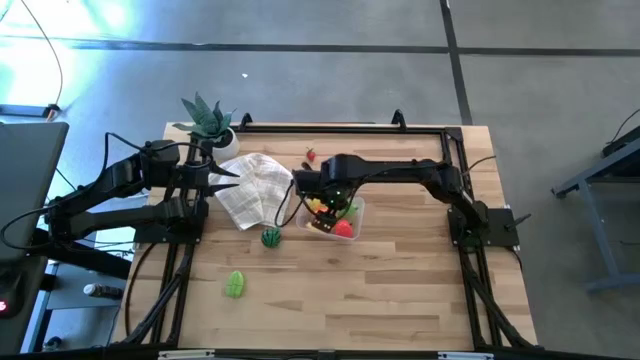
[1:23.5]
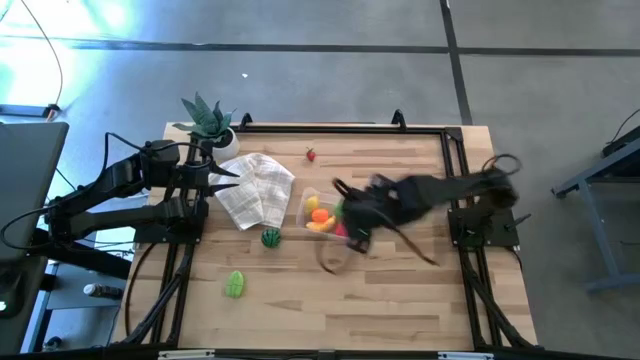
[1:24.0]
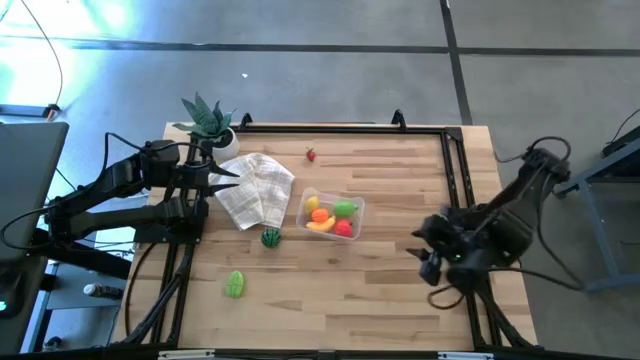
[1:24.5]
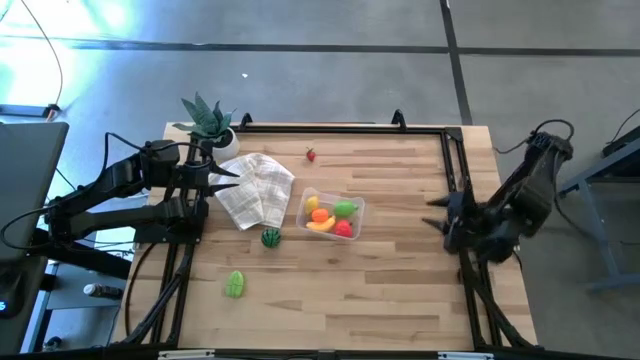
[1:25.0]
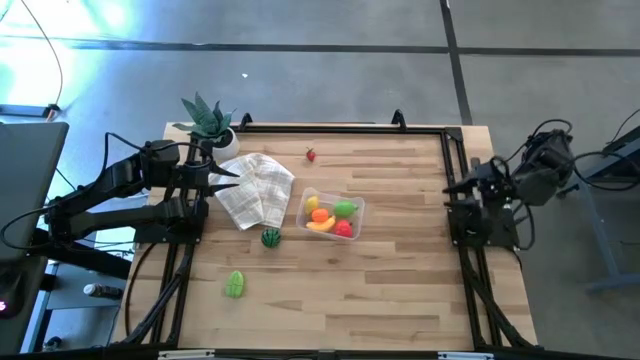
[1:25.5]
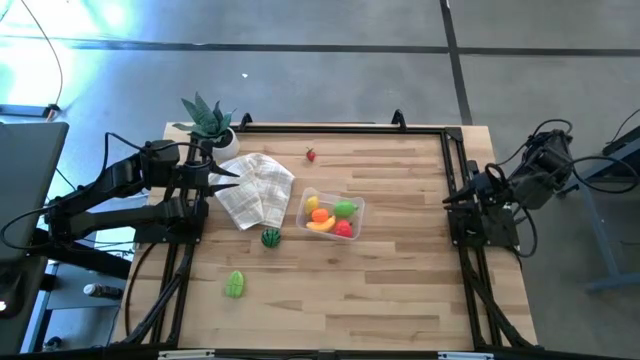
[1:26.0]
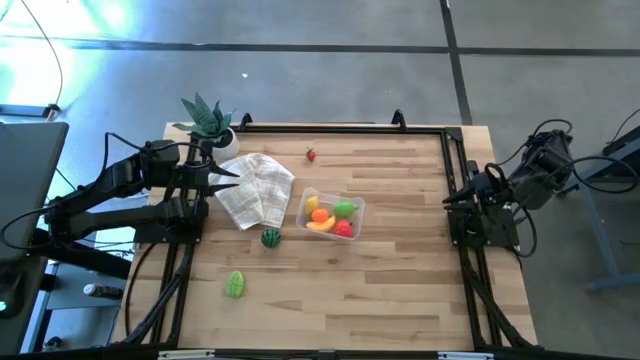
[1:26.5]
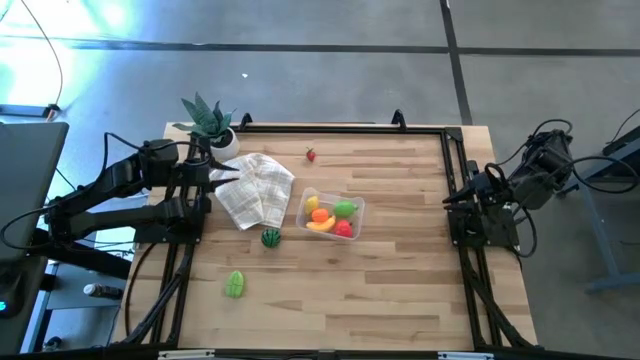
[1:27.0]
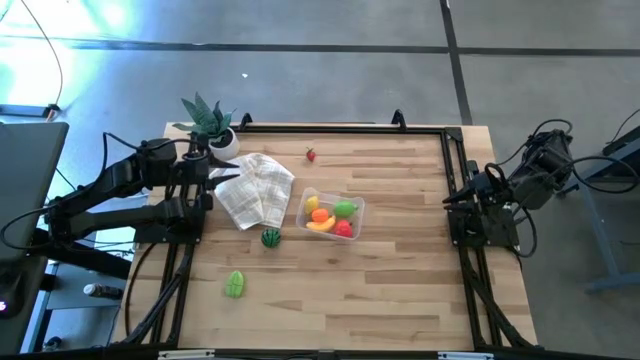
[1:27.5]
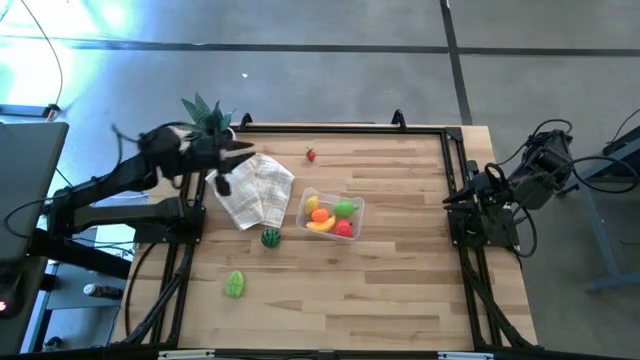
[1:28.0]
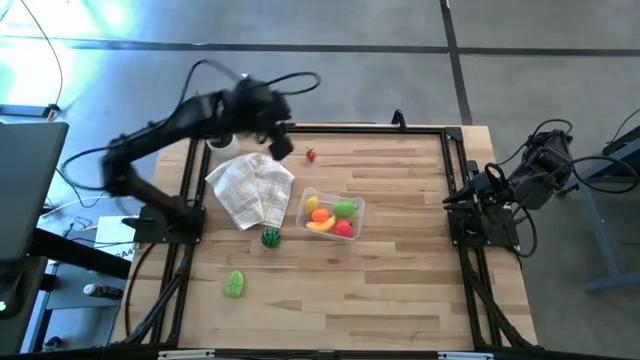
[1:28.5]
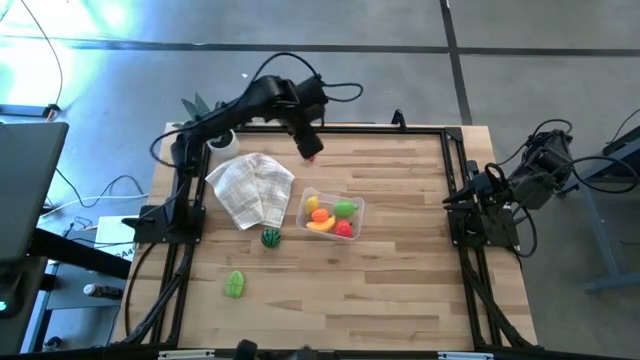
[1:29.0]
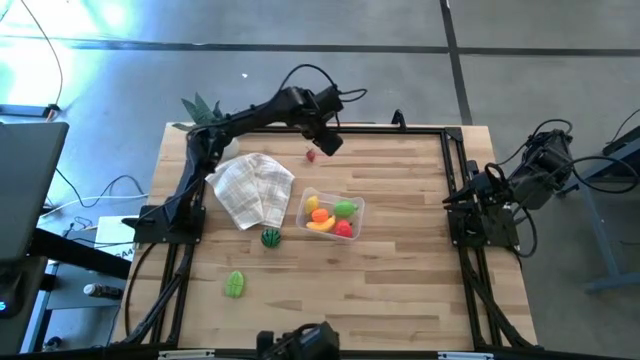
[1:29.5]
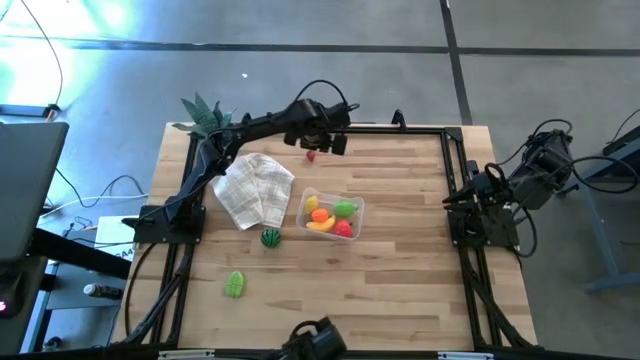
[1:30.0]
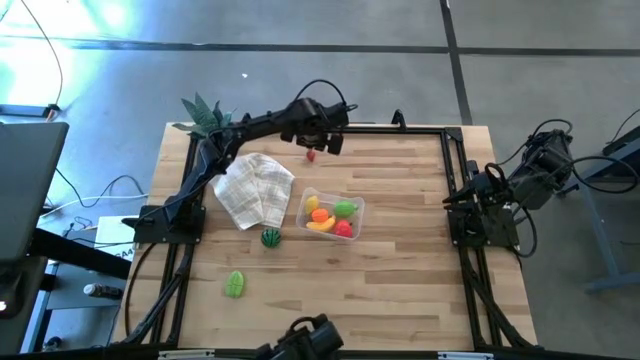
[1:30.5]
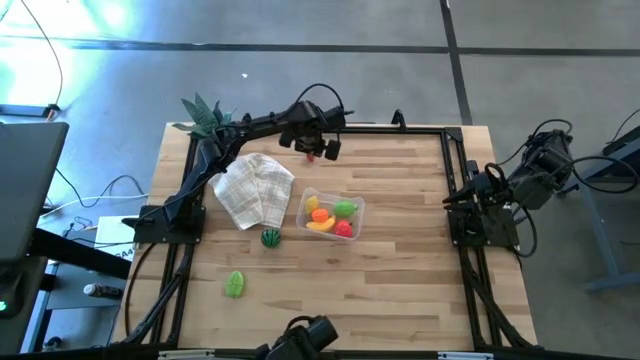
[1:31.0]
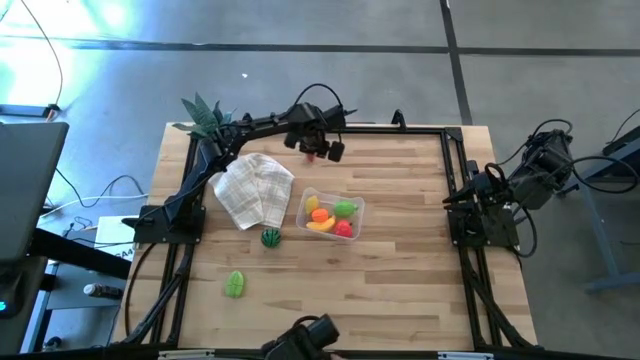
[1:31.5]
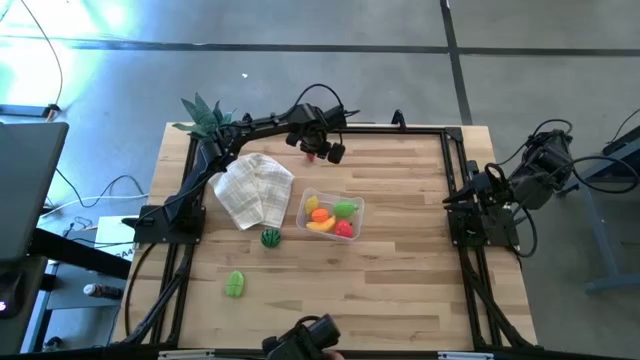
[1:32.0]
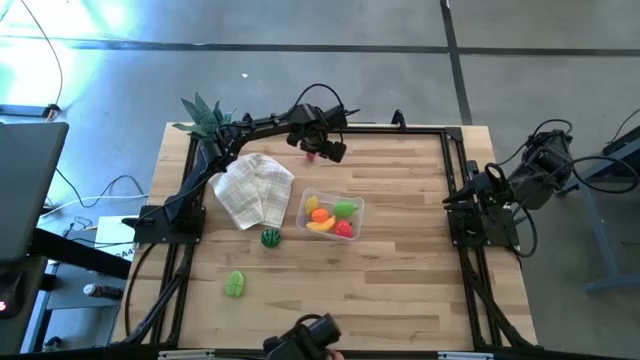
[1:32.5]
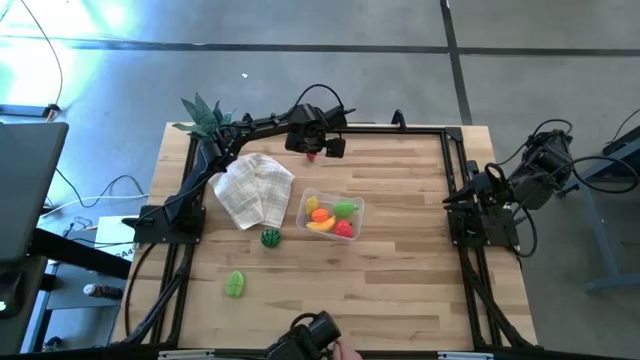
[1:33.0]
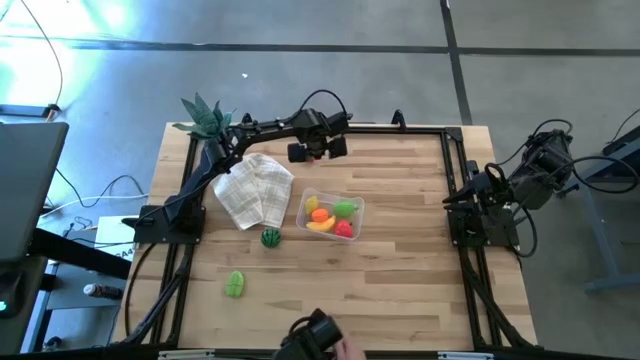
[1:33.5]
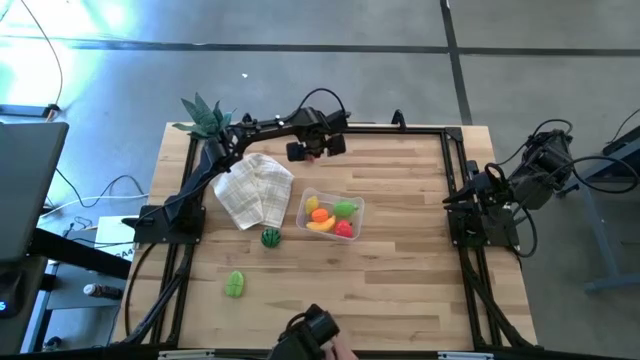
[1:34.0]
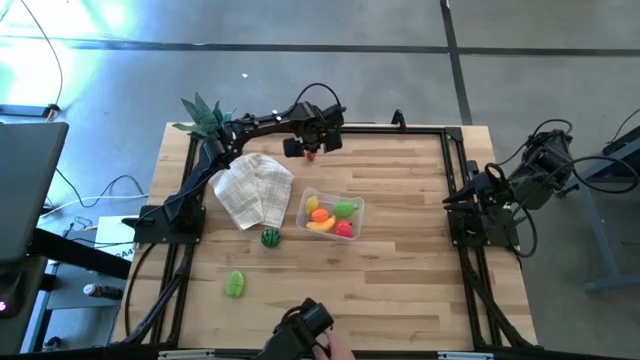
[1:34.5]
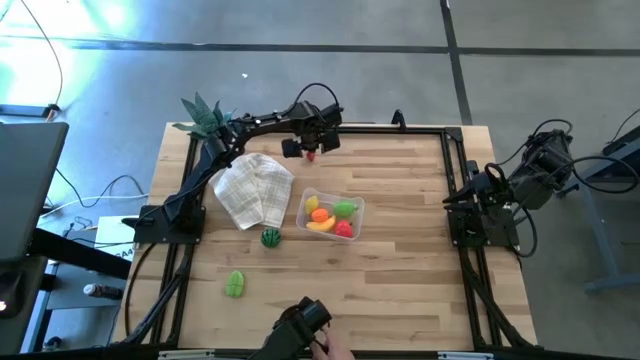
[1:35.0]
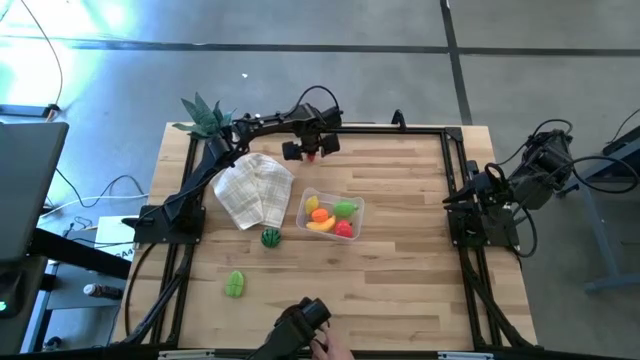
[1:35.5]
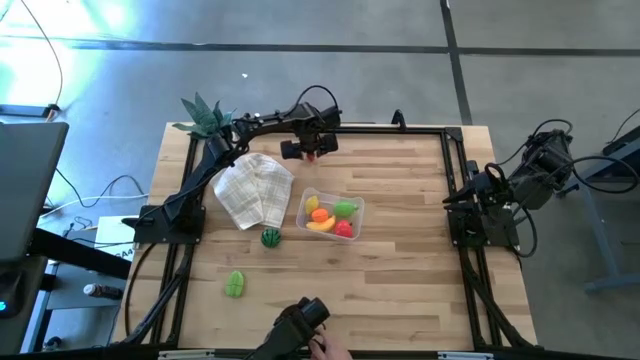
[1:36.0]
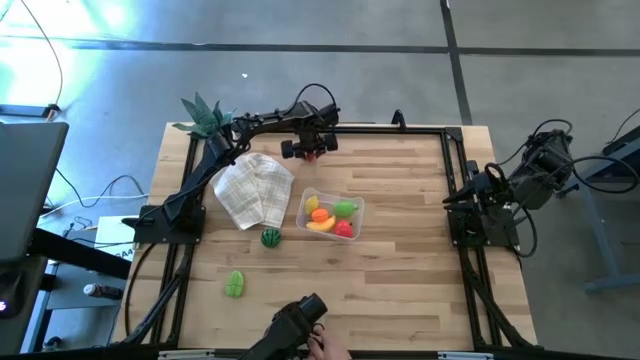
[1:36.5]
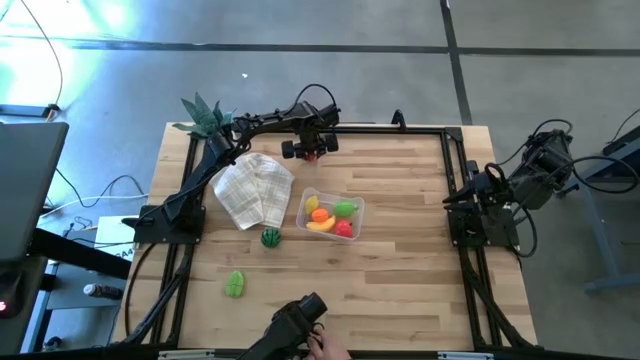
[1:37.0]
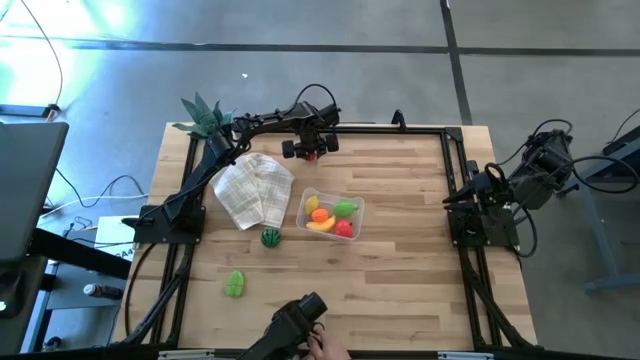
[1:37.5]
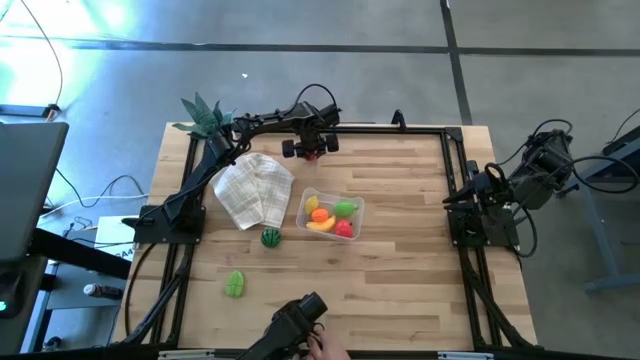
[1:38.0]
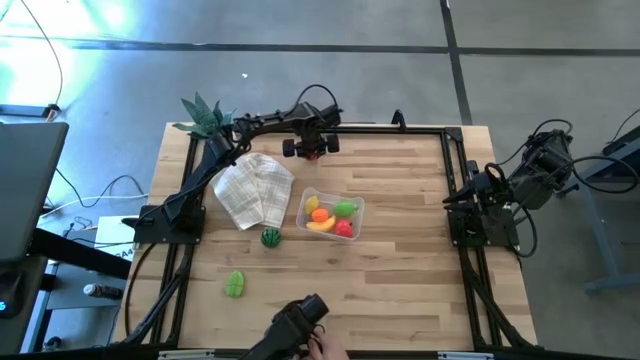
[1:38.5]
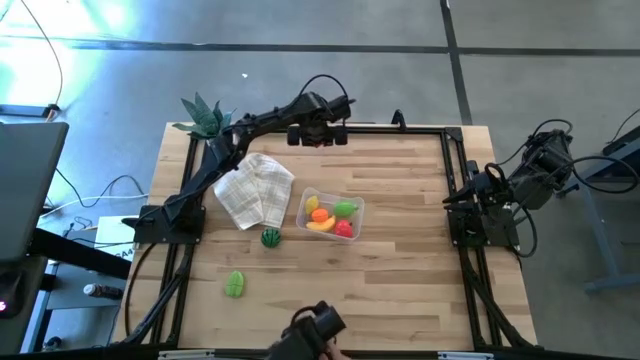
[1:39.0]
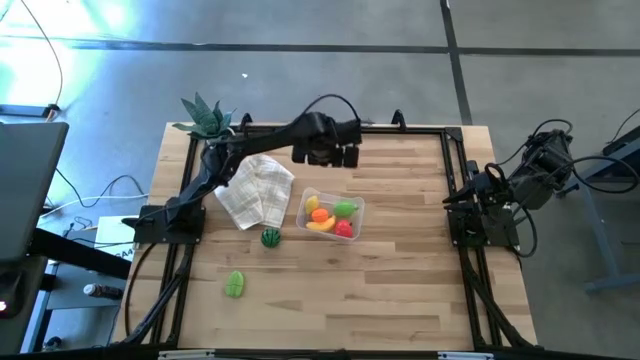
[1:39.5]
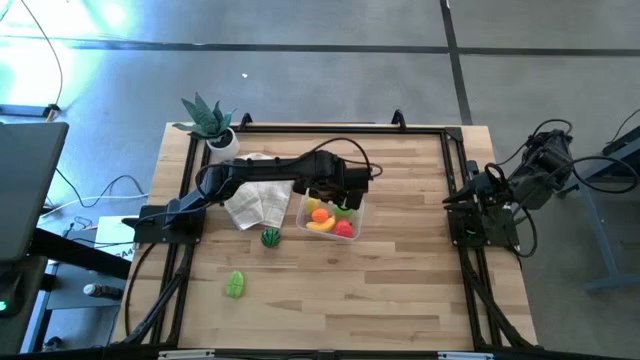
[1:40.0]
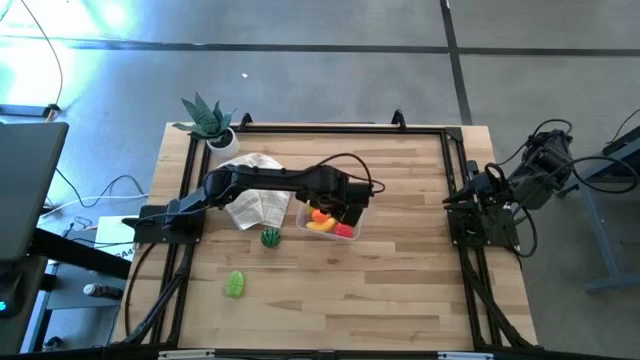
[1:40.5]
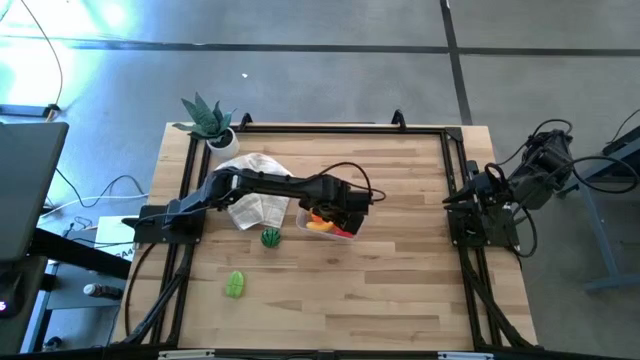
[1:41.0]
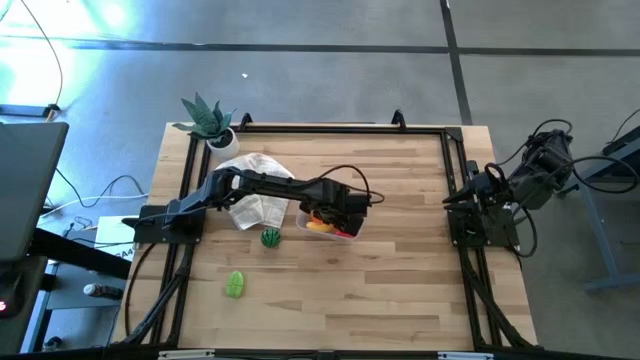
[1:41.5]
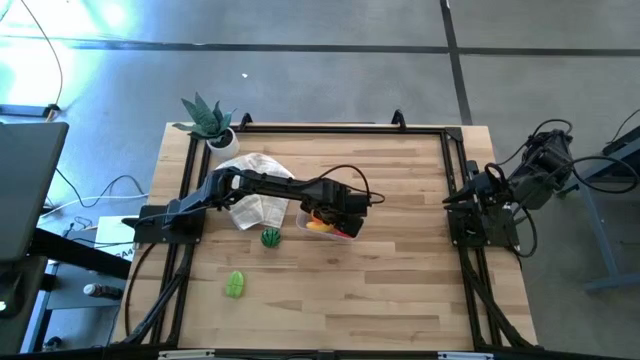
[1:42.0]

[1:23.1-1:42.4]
Task: Pick and placing Produce into tupperware
Put the red strawberry into the transparent container

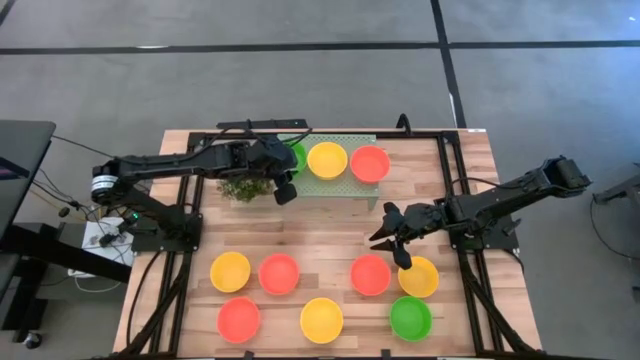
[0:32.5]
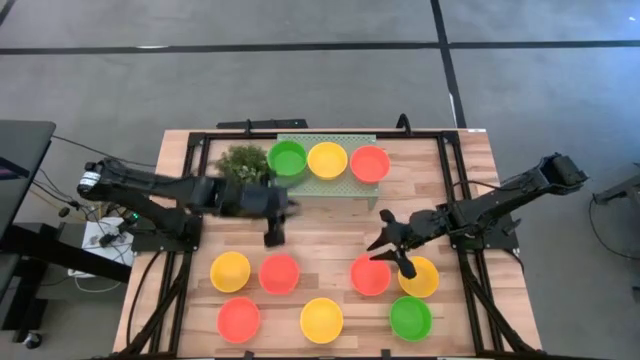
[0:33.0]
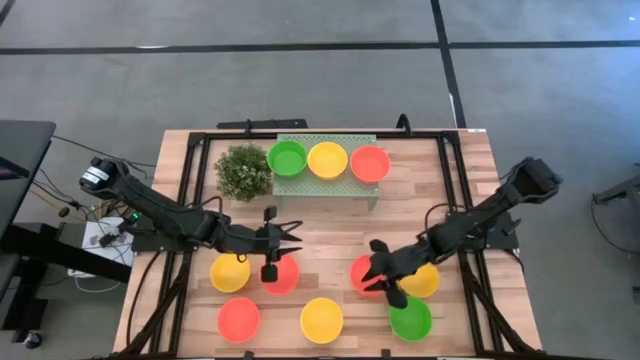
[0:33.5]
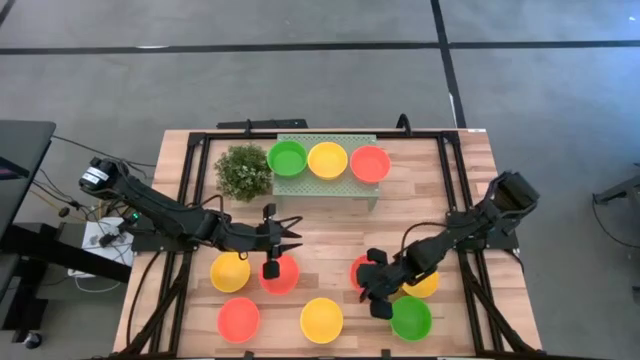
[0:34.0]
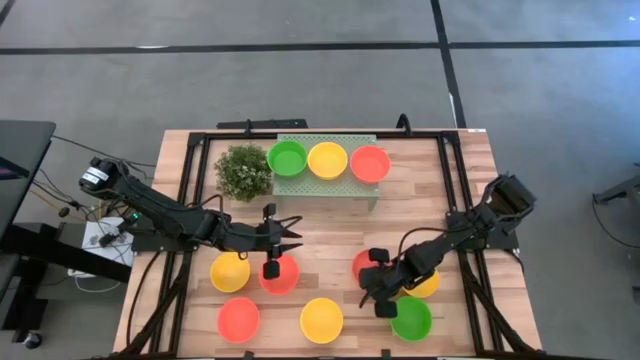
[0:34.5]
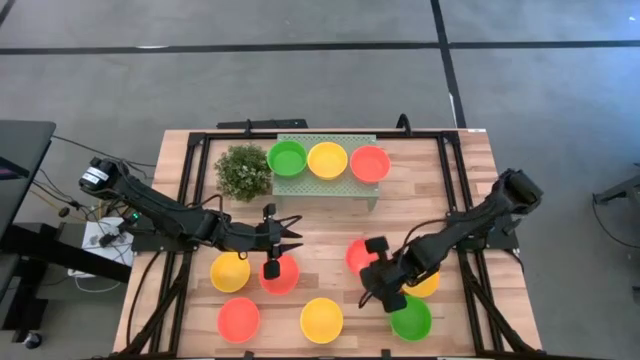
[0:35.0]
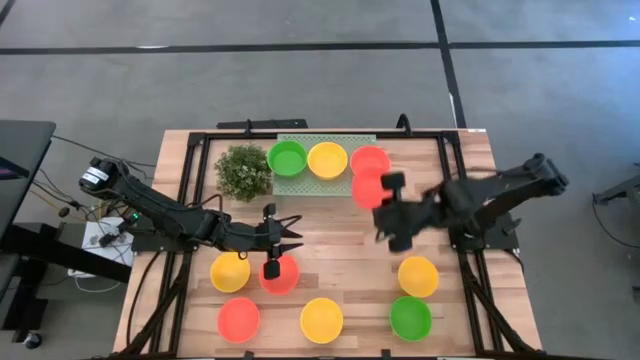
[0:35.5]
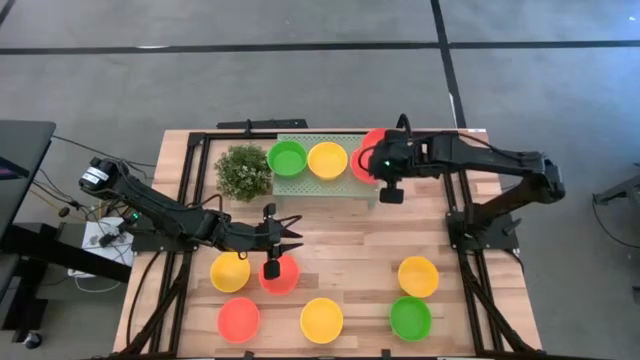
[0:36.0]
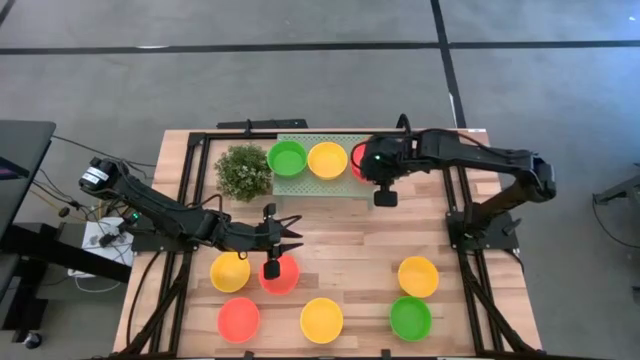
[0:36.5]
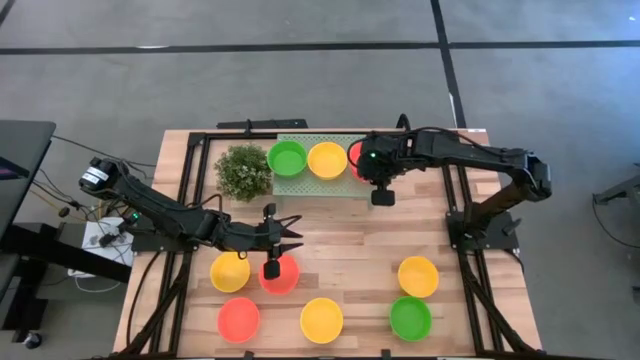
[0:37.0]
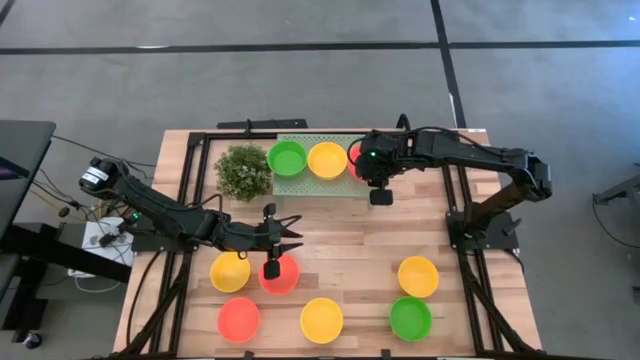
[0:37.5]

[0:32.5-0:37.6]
Task: Pick & Place Mini bowls
Stack the orange bowl on the orange bowl on the shelf
